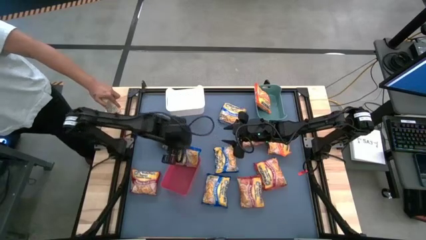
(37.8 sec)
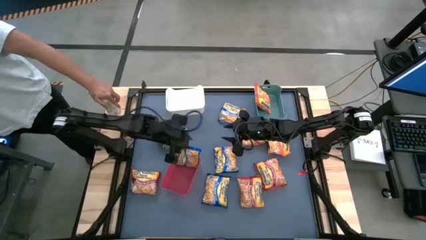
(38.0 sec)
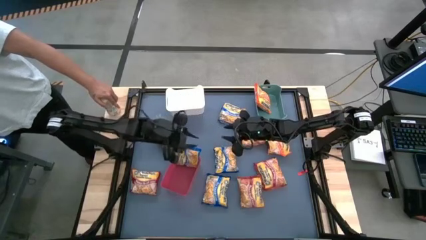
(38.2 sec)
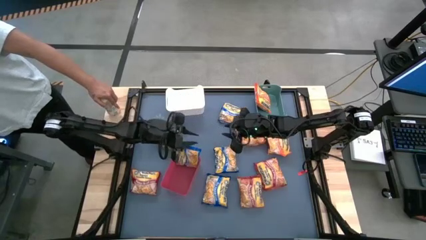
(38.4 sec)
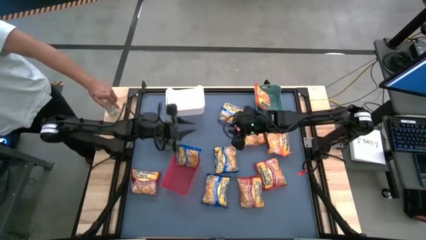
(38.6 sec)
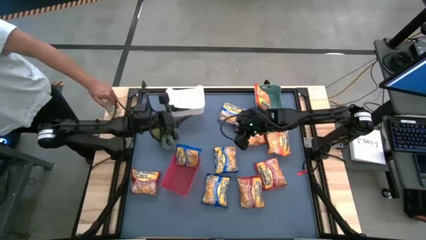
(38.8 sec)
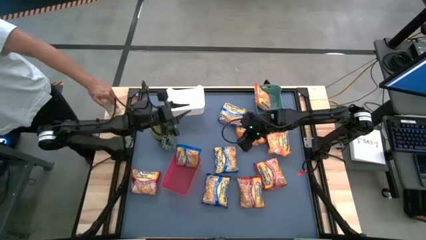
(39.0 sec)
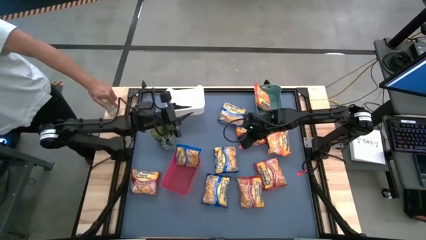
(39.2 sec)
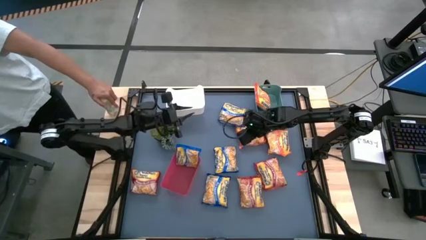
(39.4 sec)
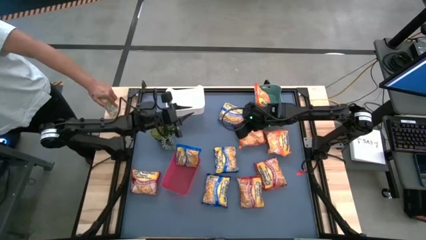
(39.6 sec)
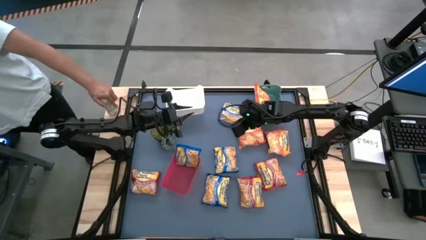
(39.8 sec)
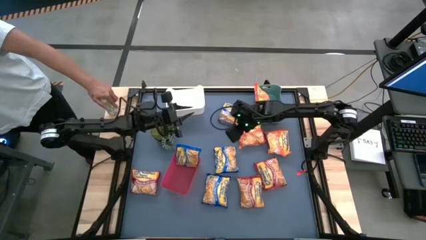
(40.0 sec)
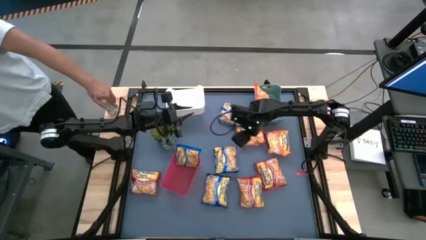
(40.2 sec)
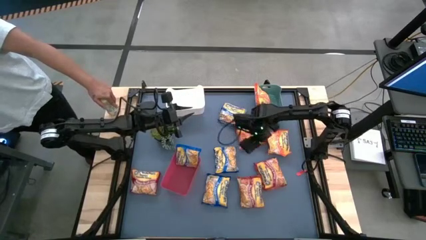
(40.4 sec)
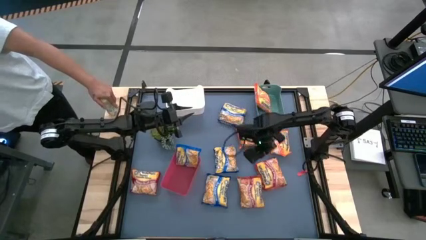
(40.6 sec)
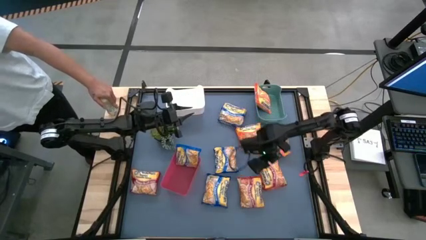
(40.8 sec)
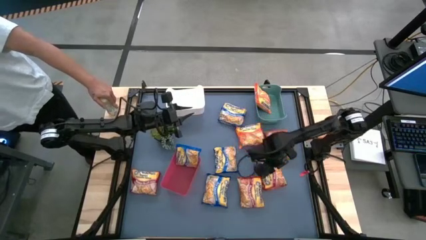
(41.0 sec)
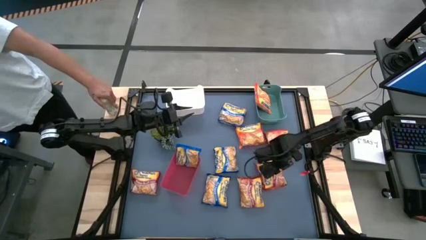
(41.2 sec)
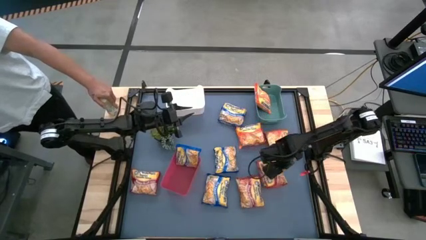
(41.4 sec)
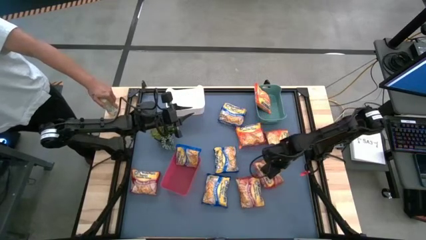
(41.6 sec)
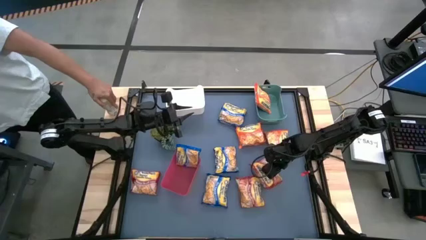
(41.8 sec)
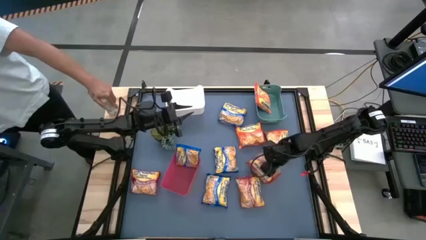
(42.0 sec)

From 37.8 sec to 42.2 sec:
Task: Sort Maruchan noodles
Put the top red noodle pack into the white bin

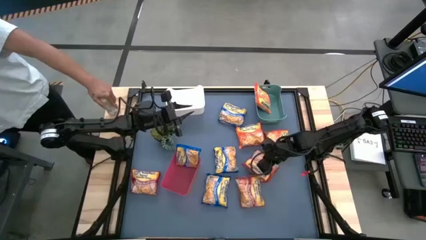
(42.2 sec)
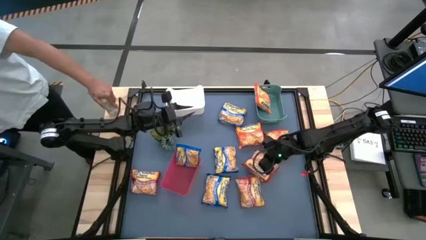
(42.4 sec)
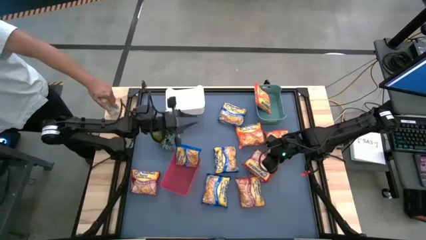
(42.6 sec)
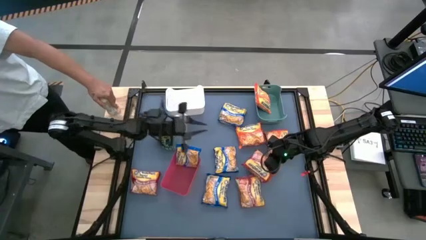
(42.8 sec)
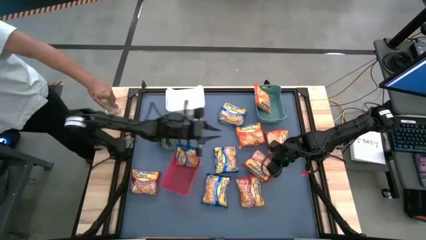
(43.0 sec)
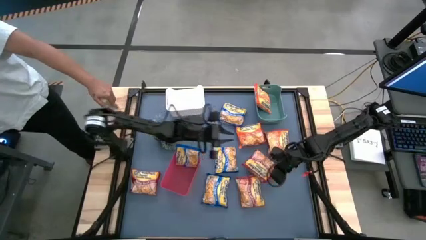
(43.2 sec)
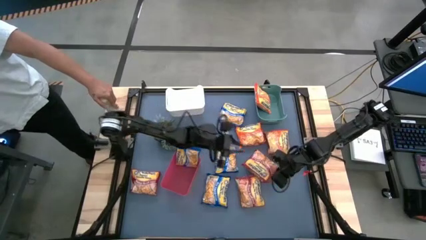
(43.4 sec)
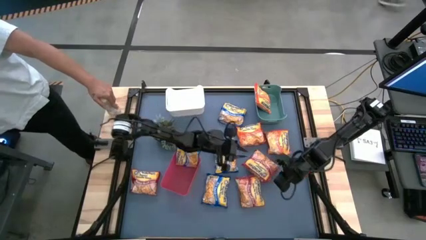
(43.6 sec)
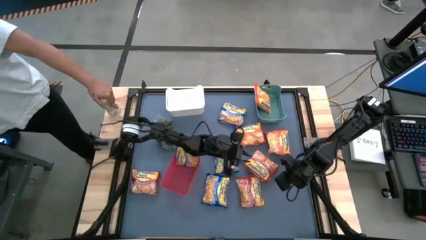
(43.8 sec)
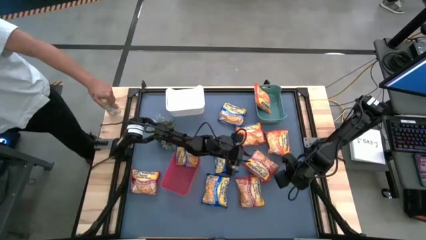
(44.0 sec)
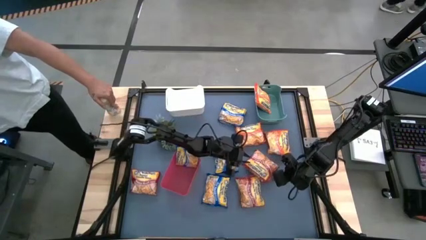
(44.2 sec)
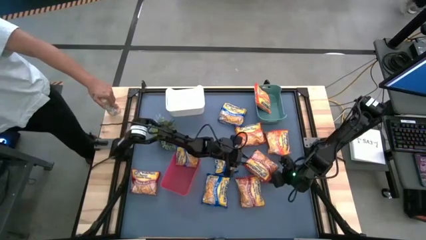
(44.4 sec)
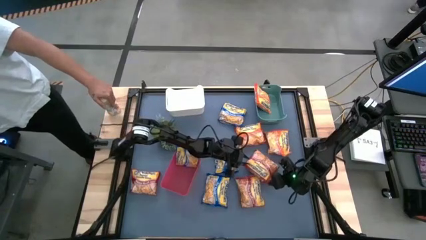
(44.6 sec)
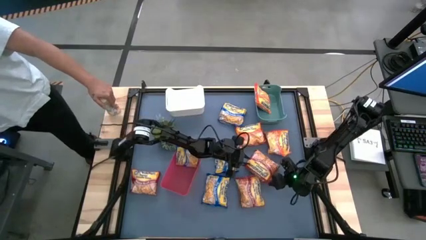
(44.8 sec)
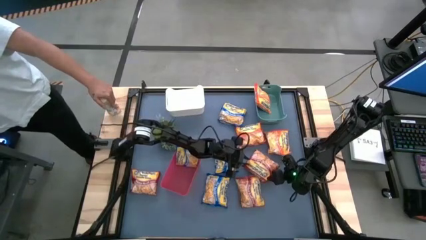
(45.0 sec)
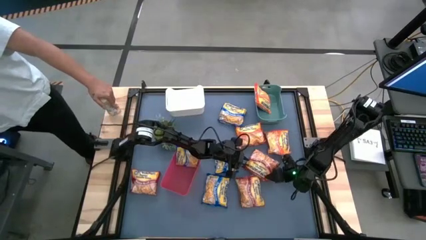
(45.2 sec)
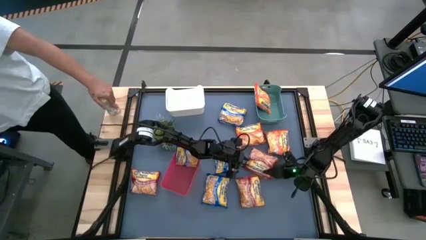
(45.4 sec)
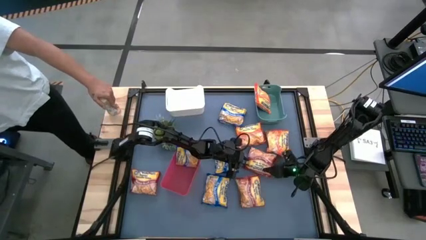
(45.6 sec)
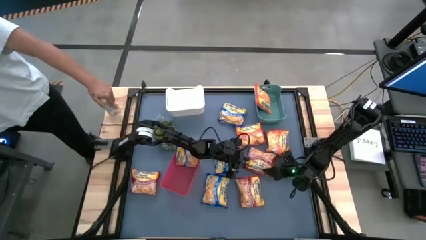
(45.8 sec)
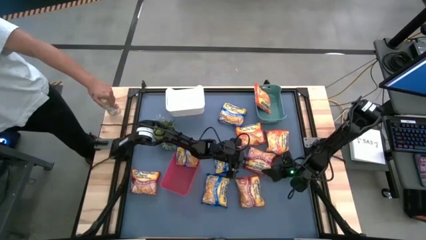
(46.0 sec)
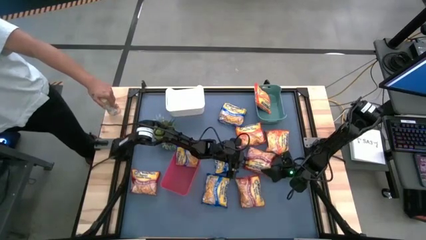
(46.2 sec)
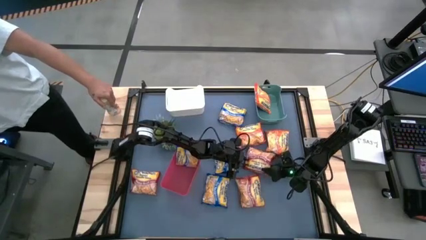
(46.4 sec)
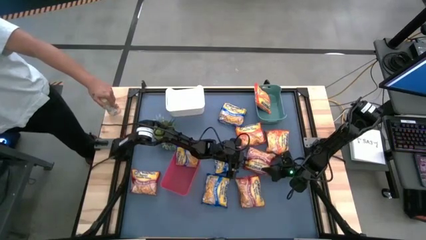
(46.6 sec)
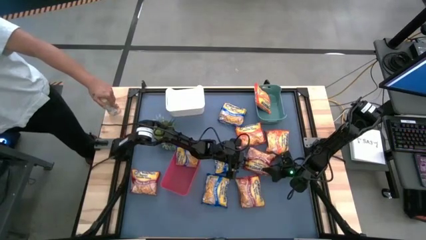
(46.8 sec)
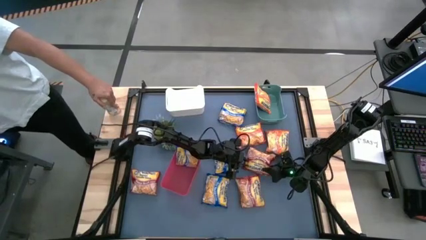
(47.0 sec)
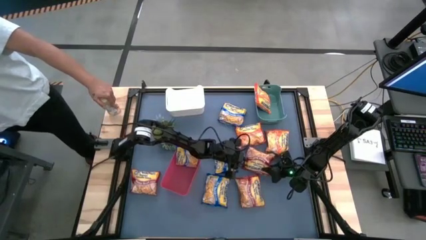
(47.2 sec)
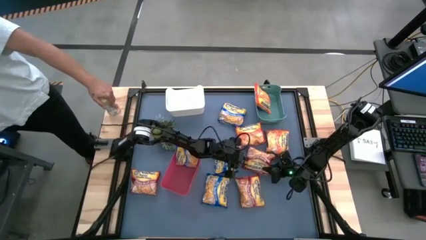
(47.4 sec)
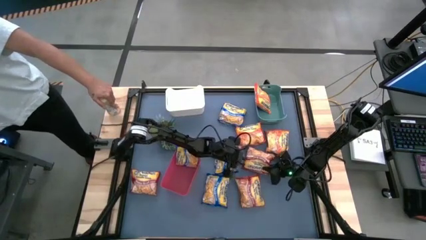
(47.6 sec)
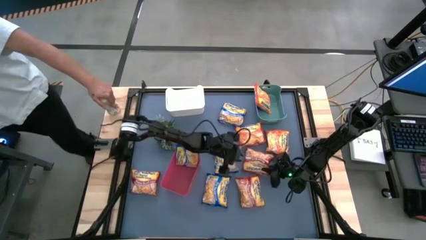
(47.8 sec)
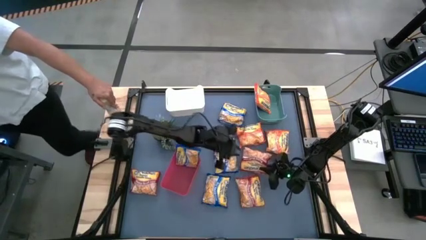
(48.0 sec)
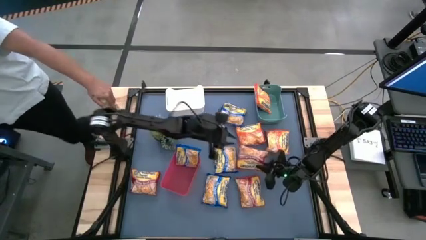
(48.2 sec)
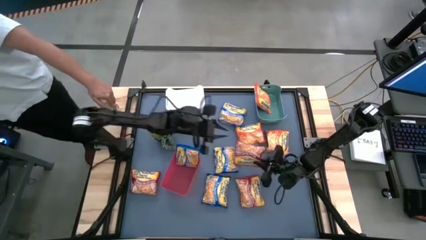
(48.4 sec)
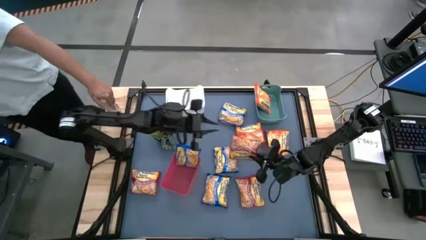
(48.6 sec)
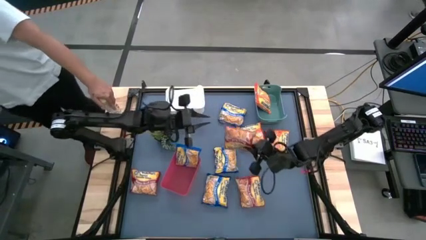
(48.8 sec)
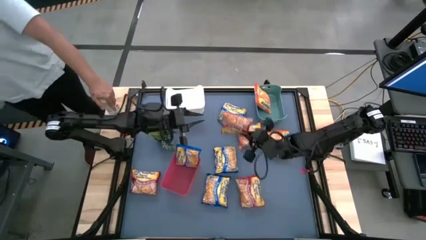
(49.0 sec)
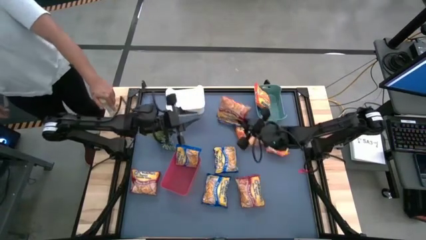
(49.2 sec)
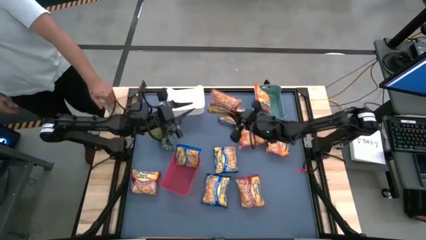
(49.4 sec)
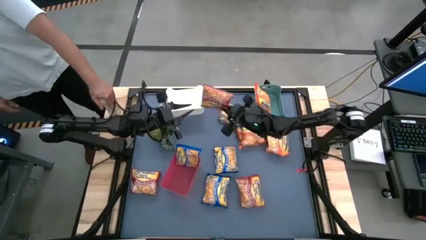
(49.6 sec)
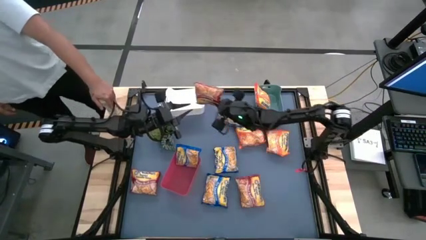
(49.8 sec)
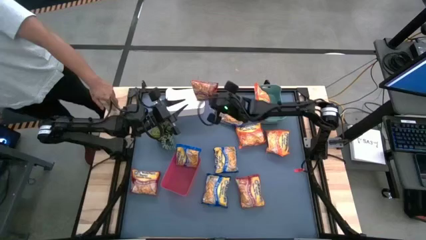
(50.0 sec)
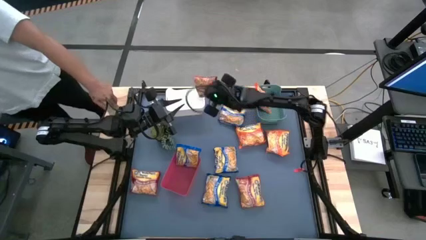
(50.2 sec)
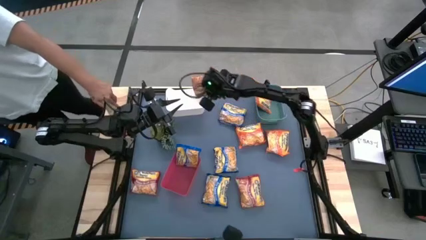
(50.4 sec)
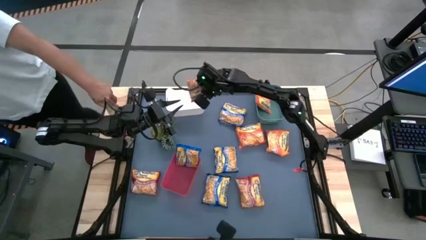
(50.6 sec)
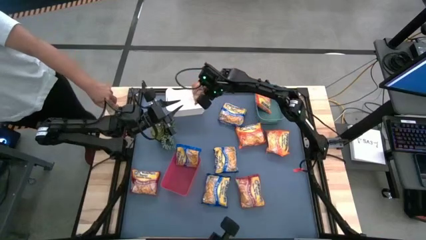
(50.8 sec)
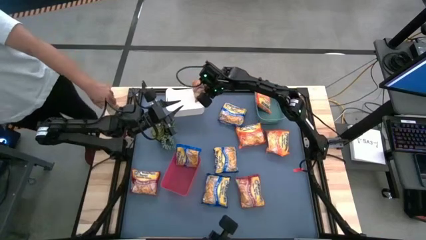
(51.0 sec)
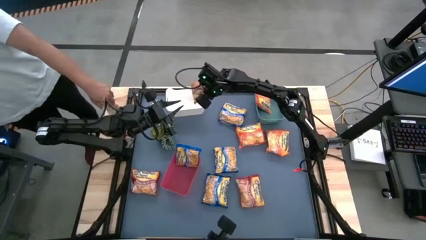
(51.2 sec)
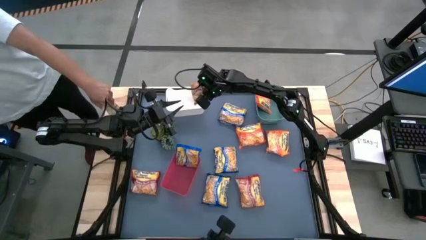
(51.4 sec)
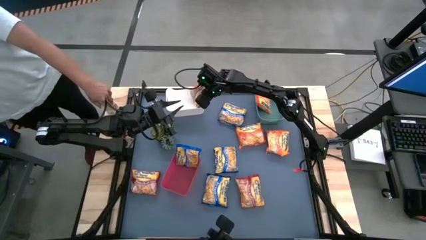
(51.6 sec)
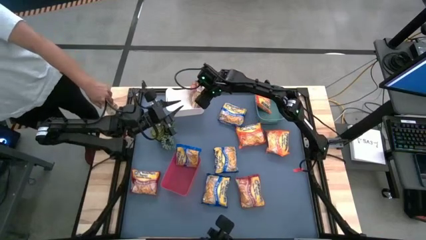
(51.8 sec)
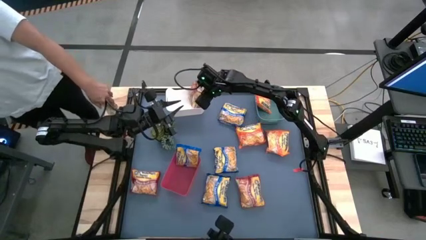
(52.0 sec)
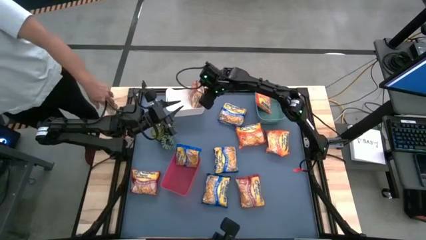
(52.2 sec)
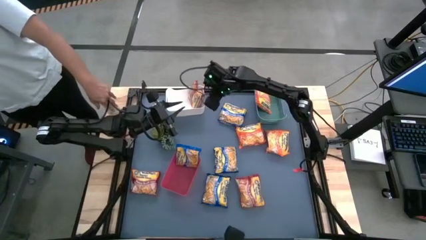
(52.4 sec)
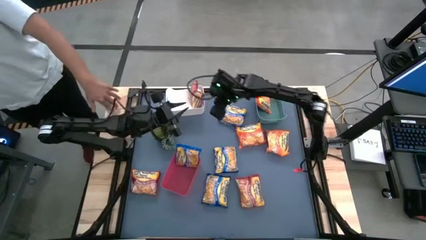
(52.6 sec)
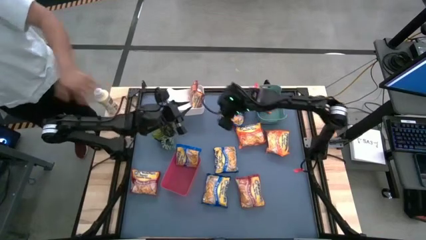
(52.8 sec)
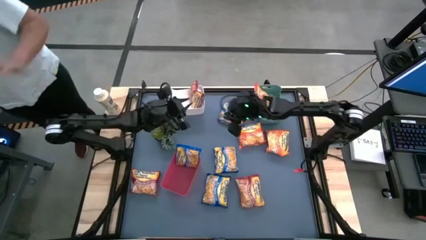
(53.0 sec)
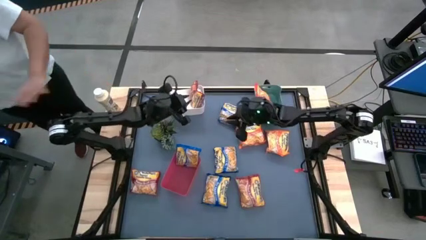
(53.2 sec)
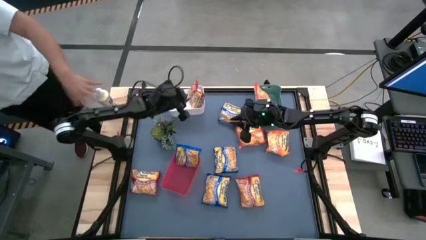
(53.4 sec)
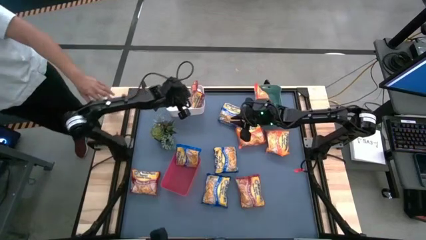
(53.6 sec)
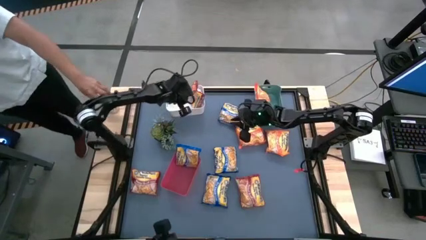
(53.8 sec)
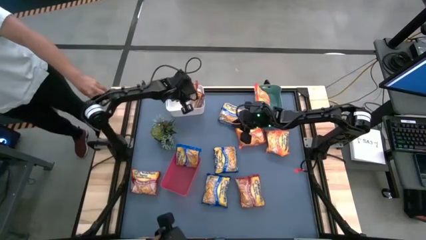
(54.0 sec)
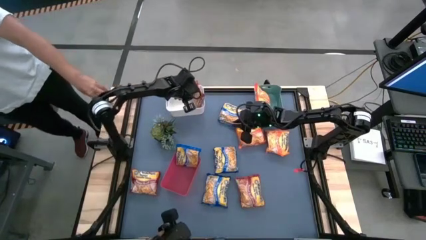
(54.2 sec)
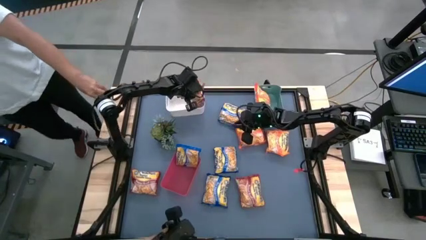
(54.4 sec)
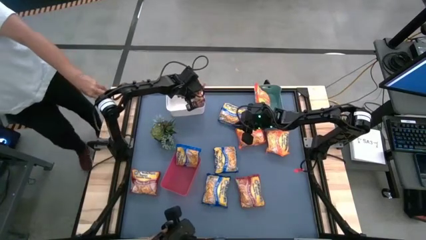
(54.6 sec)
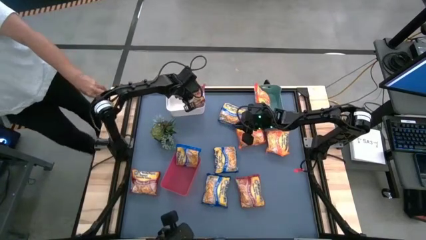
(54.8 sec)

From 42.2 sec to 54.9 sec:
Put the top red noodle pack into the white bin
